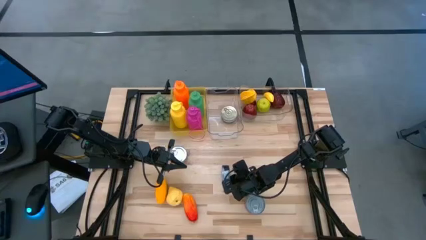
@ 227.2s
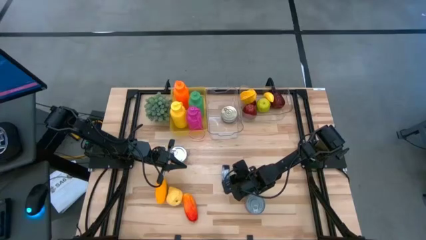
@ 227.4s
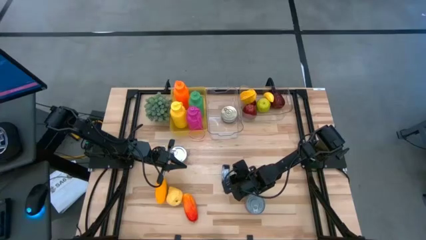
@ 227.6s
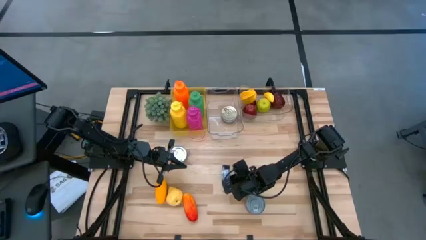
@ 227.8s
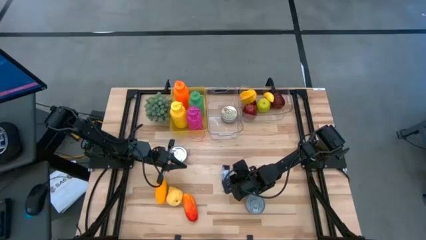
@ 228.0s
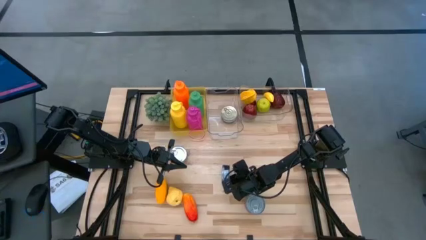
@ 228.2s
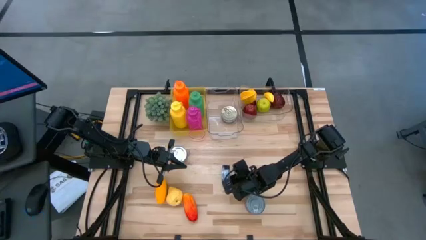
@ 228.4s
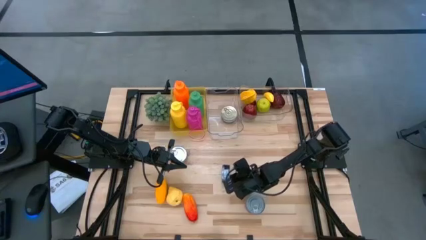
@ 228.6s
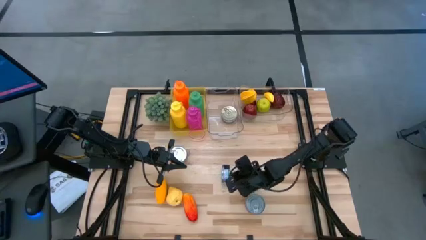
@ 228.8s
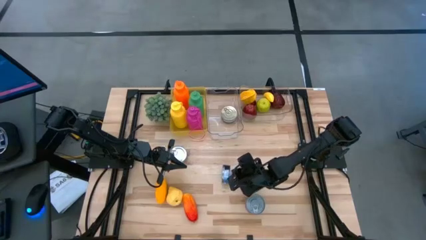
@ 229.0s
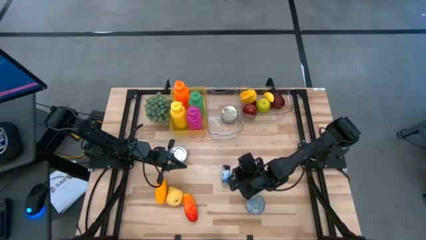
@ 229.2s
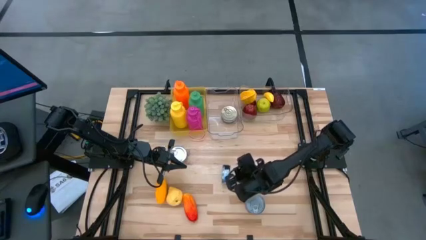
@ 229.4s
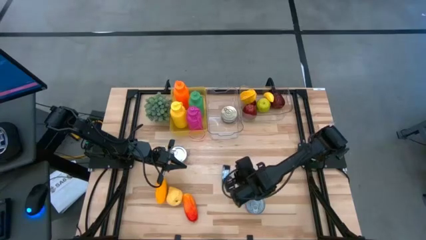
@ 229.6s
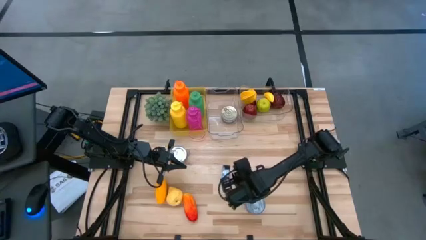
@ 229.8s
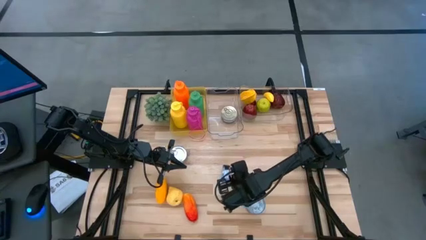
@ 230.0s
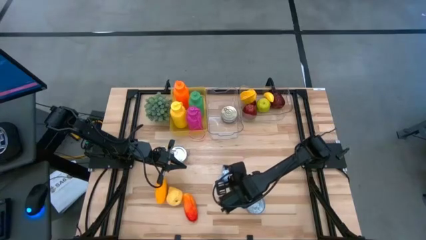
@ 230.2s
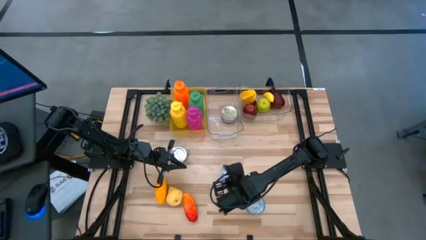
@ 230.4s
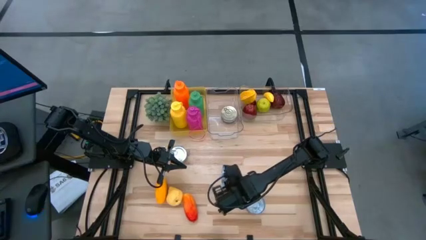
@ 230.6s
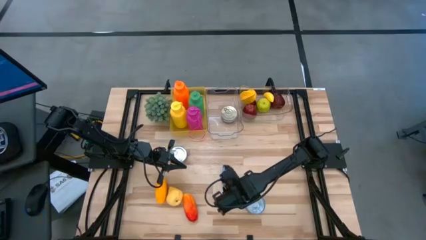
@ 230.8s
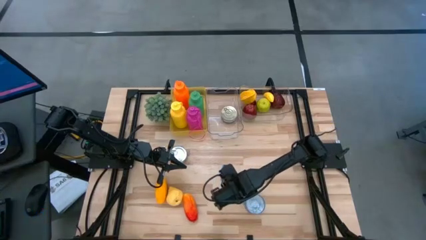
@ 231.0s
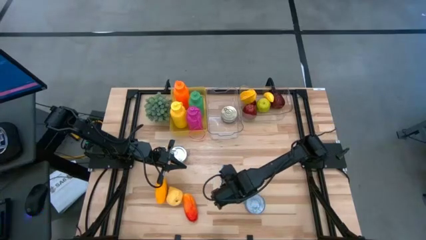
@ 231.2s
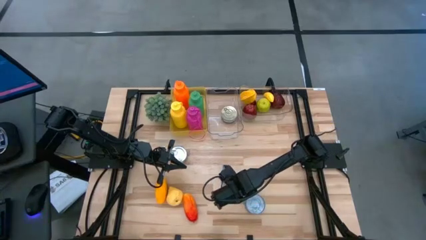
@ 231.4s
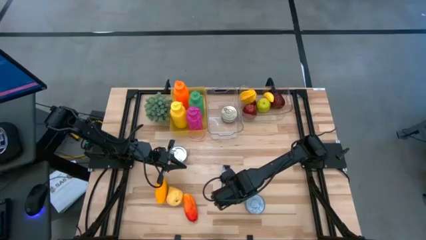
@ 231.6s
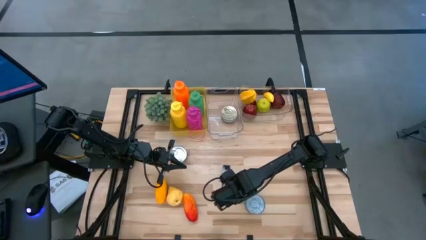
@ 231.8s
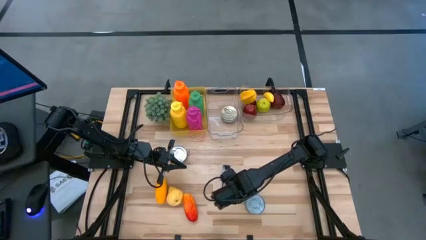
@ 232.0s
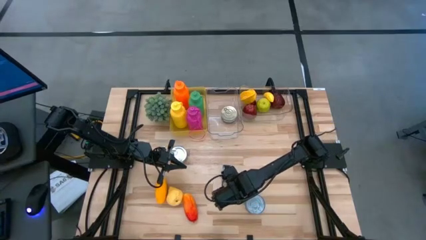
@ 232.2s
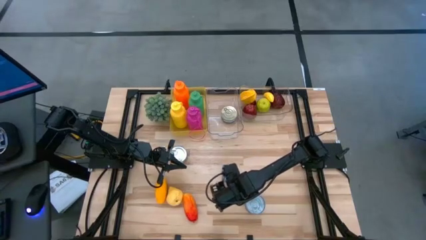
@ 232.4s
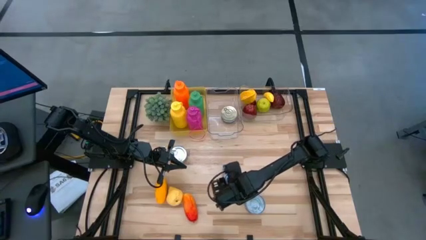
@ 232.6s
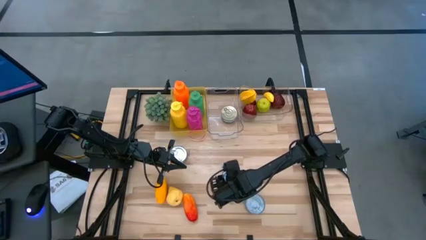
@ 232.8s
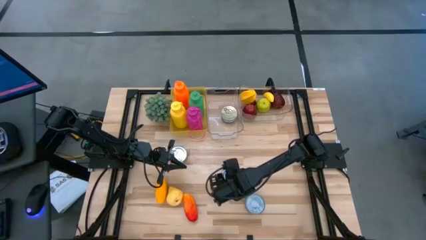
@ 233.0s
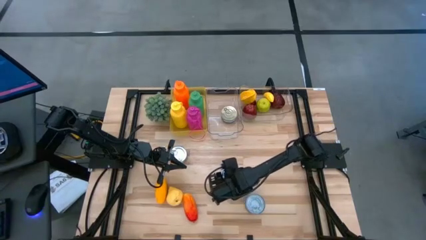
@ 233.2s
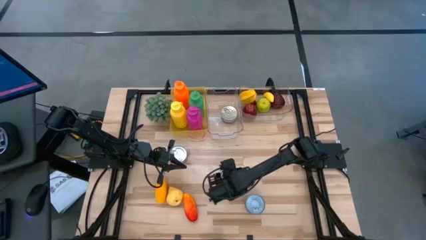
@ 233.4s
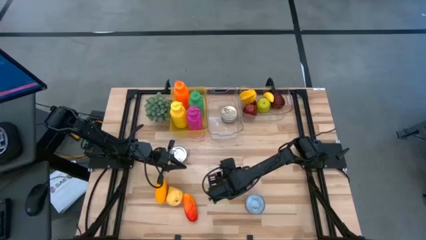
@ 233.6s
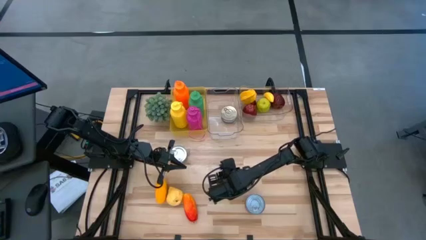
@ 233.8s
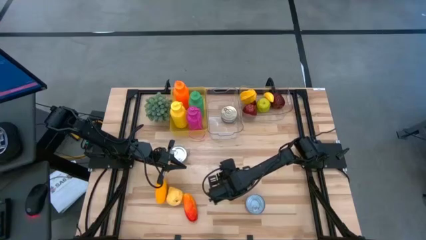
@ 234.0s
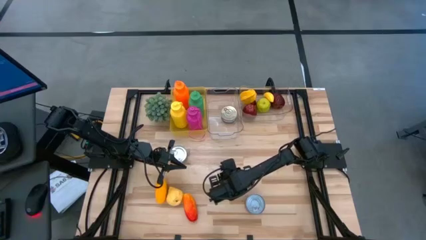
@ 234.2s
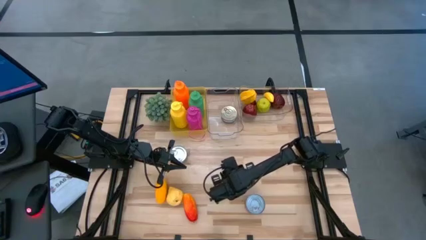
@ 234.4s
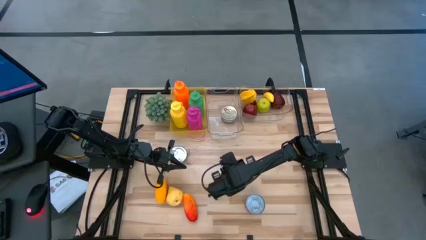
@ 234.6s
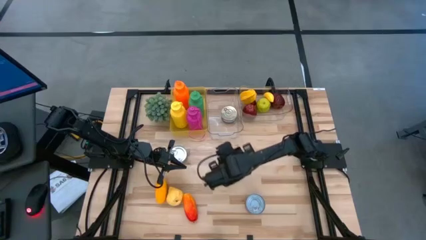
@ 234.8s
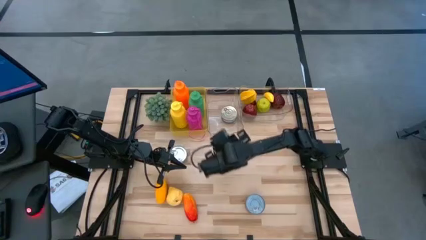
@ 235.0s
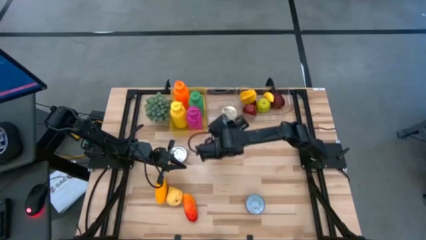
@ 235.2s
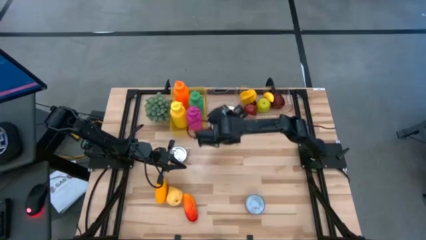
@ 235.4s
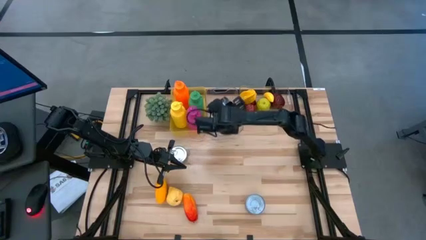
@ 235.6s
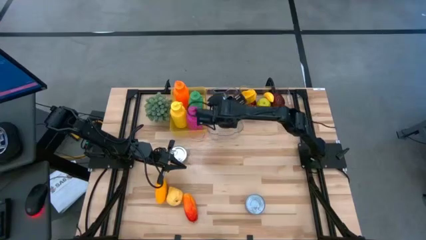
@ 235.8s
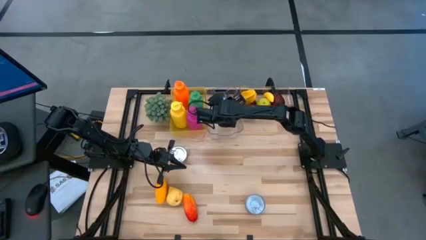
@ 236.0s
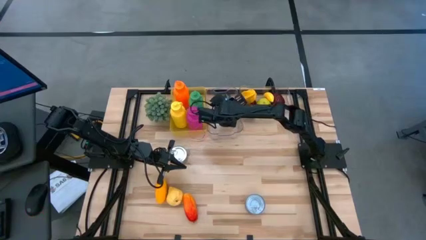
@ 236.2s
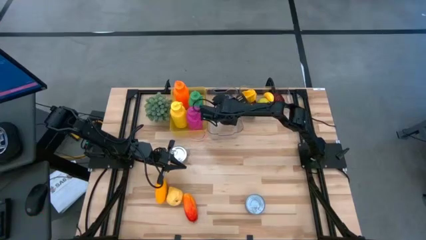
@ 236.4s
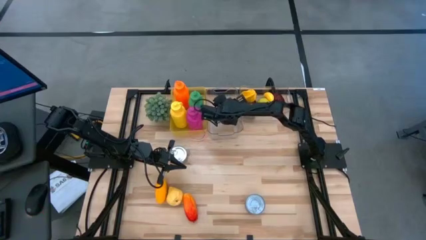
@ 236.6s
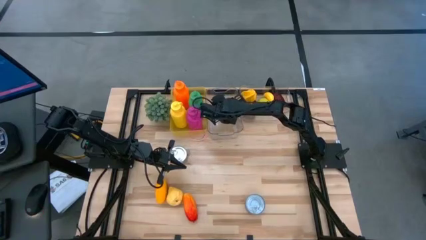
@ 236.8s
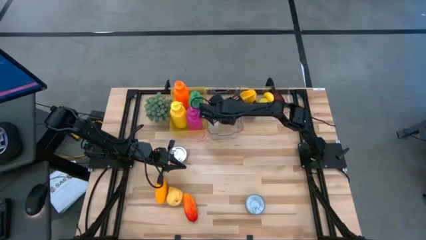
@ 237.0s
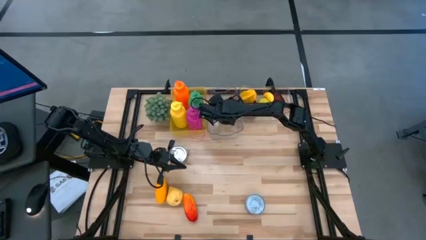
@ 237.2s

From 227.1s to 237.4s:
Task: Pick & Place Food Item
Stack the dark blue tuna on top of the blue can in the left transparent bin

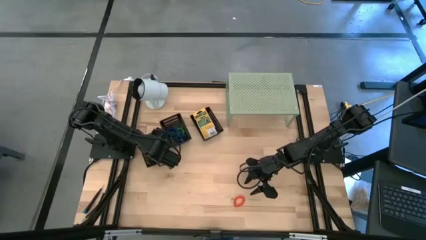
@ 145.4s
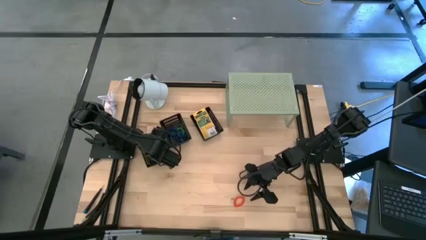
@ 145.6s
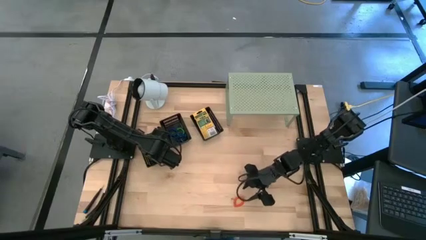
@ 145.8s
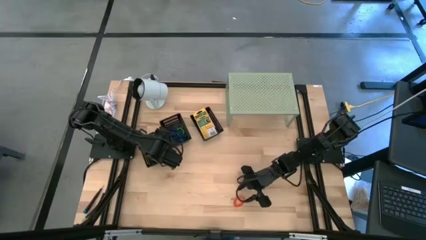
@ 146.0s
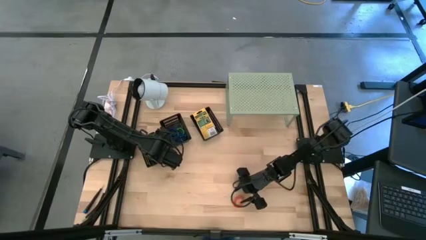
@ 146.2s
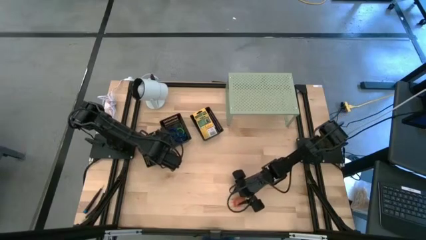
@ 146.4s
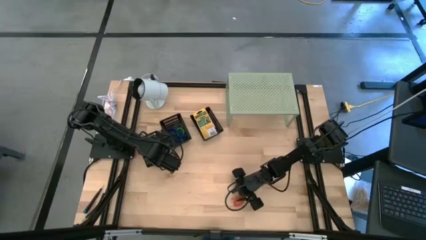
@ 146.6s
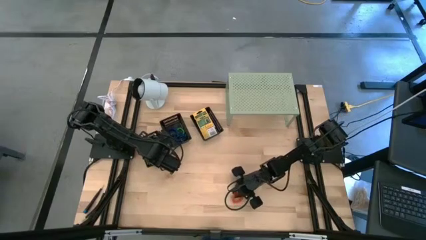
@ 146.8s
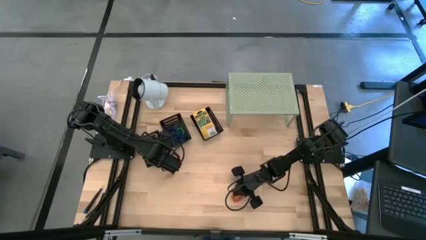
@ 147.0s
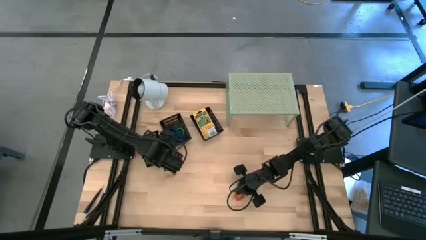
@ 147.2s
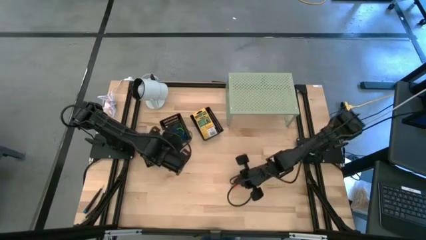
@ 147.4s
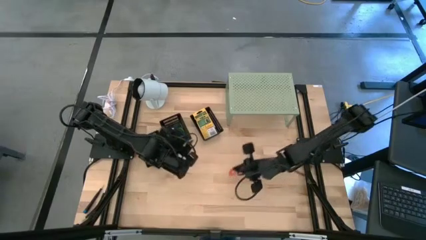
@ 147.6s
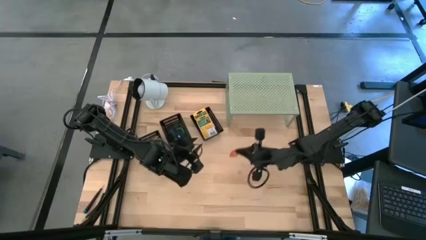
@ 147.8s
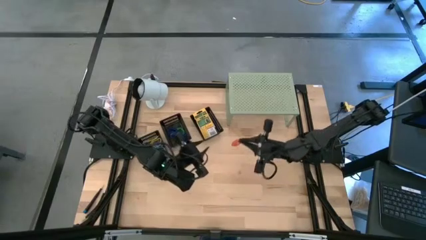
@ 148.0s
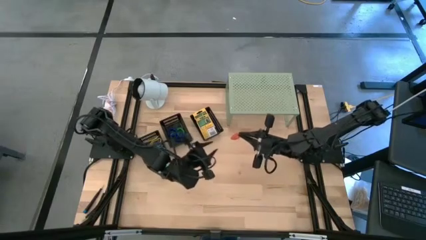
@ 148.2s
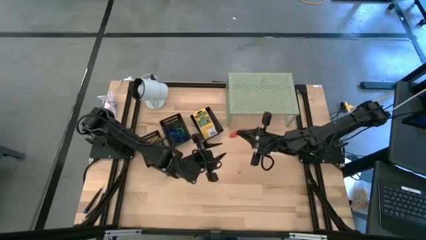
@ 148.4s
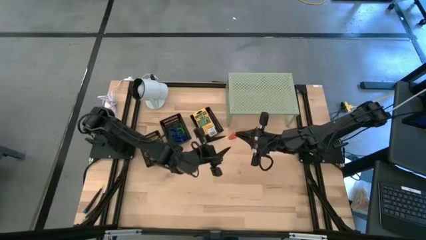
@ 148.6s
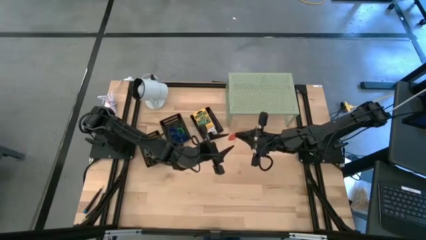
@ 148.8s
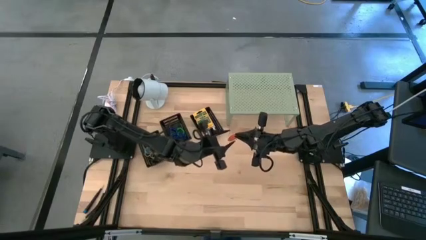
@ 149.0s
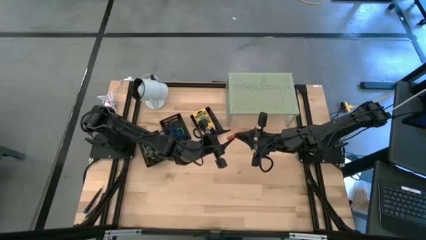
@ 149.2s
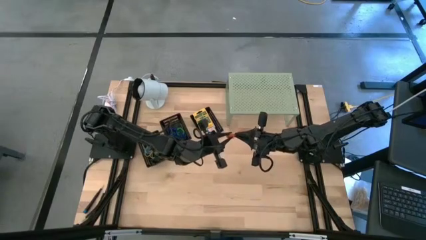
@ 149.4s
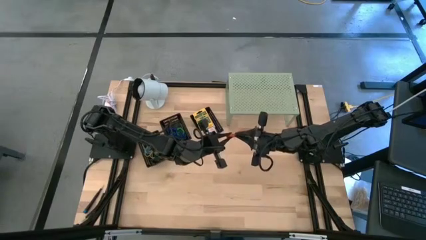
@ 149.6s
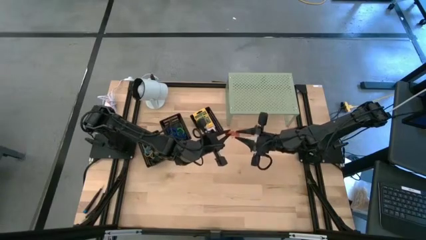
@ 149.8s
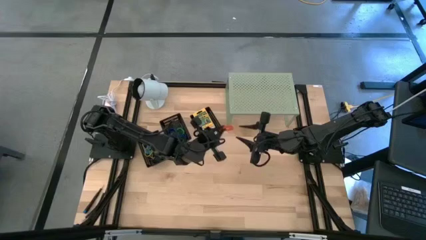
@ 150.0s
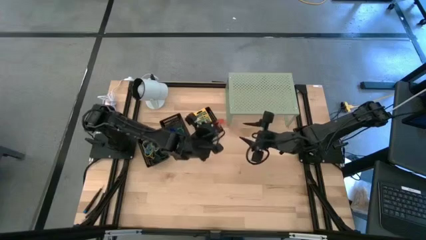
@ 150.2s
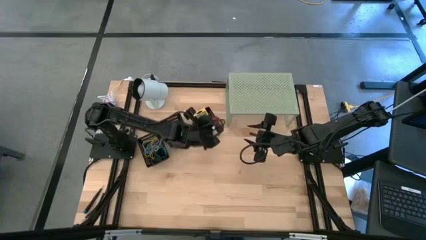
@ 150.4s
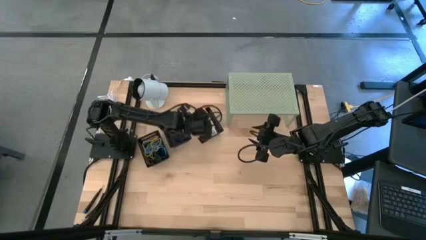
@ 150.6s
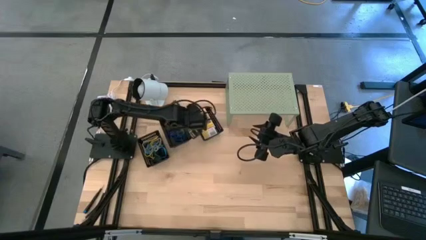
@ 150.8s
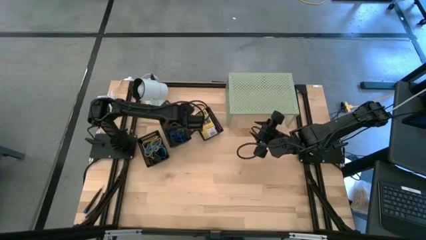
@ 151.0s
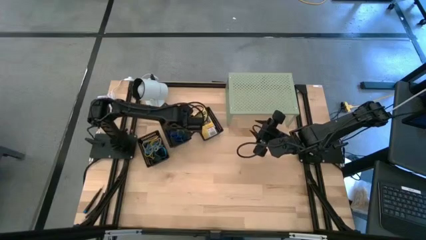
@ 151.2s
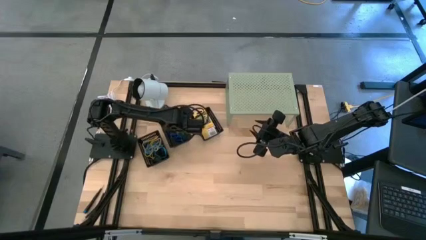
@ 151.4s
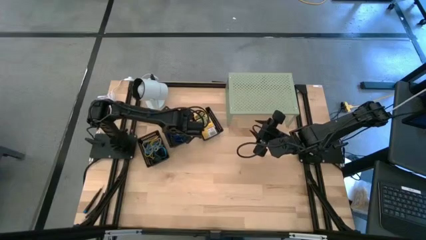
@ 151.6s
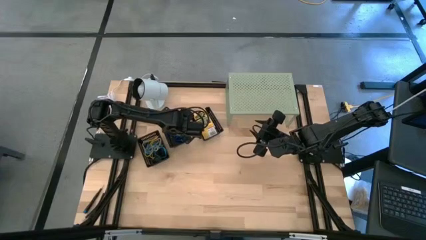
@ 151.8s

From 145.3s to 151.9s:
Task: Pick & Place Office Desk Supplies
Put the orange spring keychain into the middle black basket
